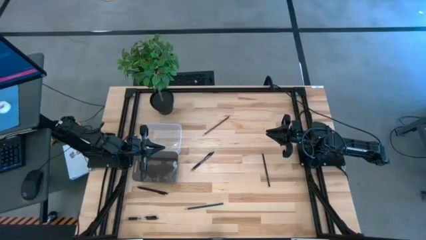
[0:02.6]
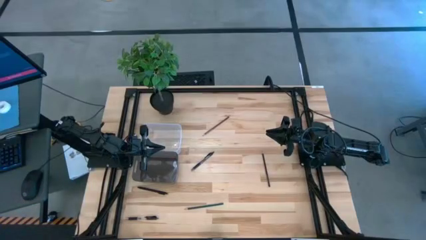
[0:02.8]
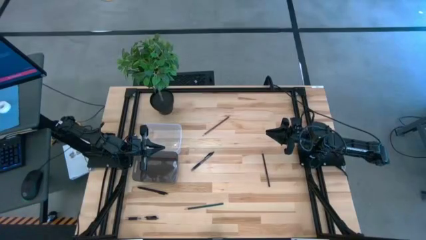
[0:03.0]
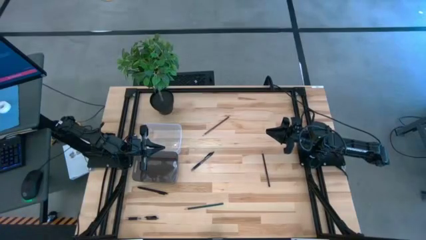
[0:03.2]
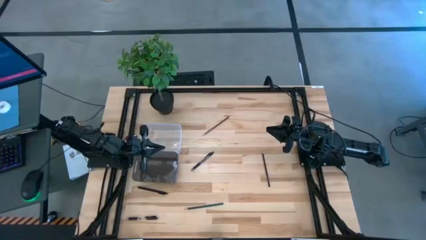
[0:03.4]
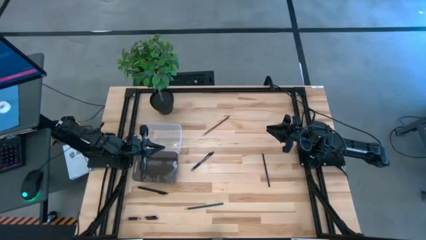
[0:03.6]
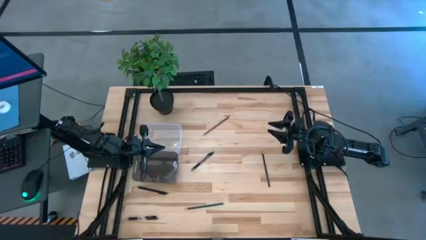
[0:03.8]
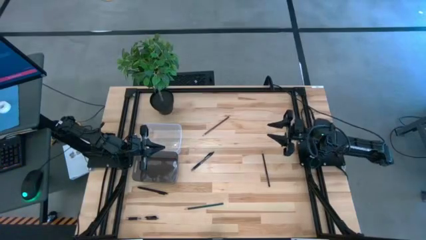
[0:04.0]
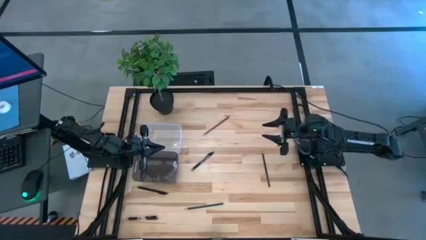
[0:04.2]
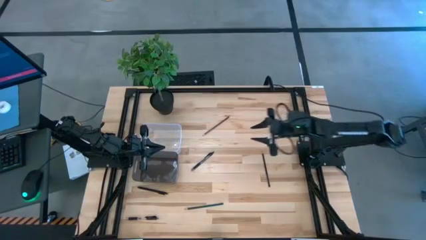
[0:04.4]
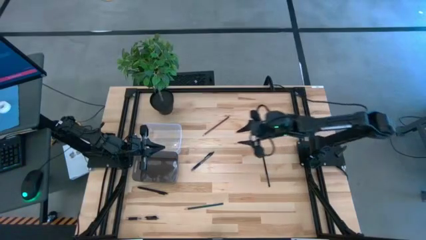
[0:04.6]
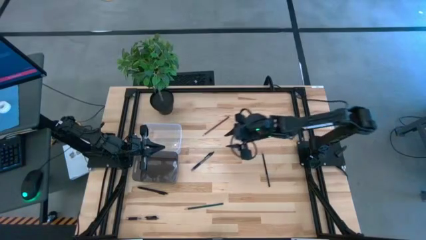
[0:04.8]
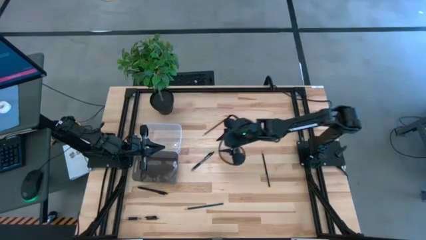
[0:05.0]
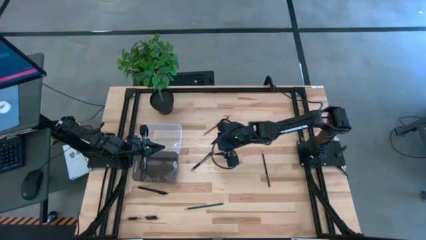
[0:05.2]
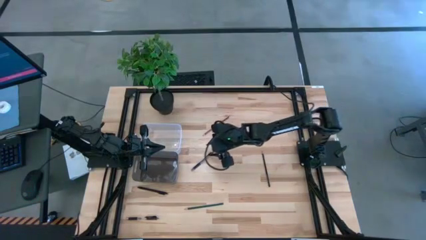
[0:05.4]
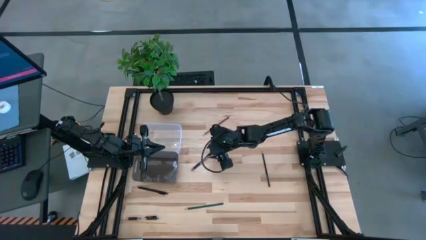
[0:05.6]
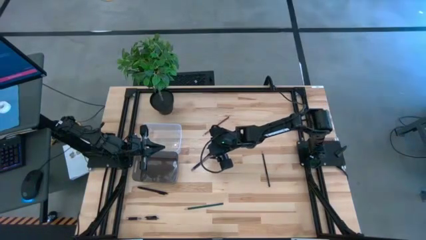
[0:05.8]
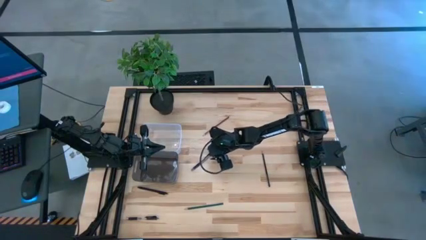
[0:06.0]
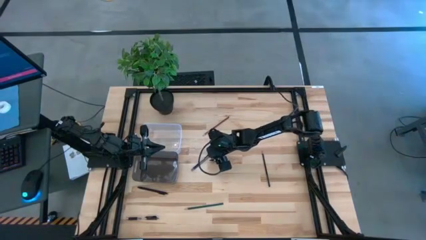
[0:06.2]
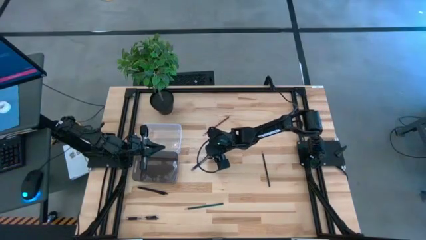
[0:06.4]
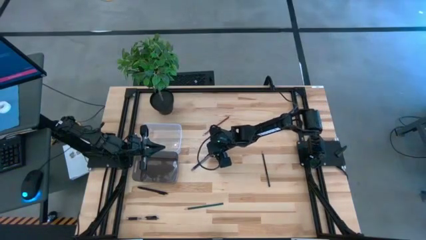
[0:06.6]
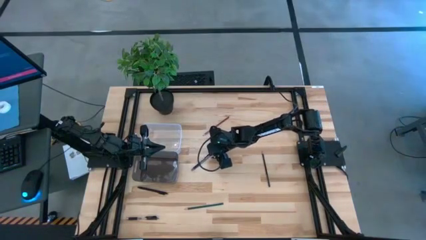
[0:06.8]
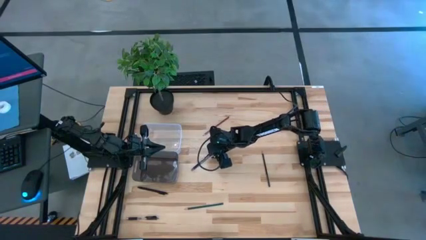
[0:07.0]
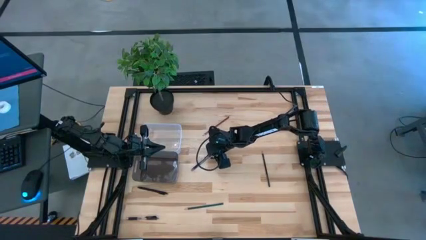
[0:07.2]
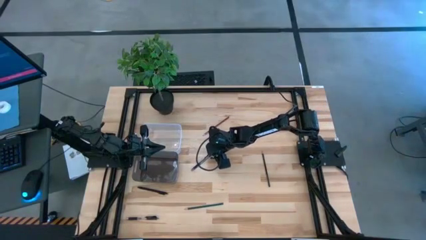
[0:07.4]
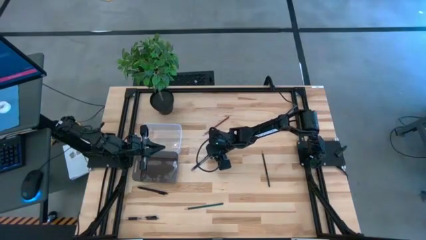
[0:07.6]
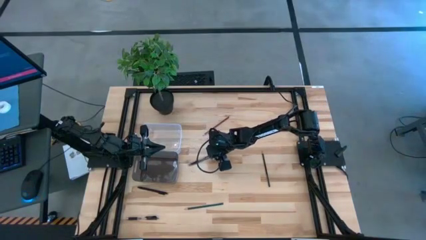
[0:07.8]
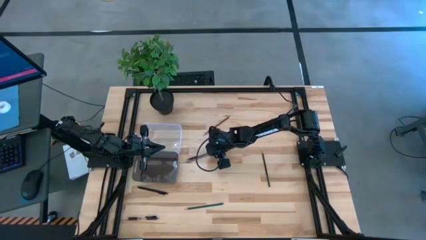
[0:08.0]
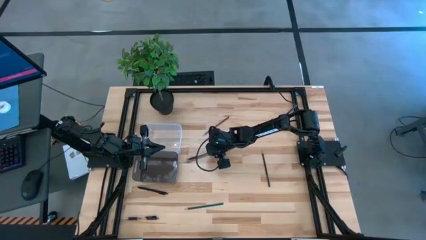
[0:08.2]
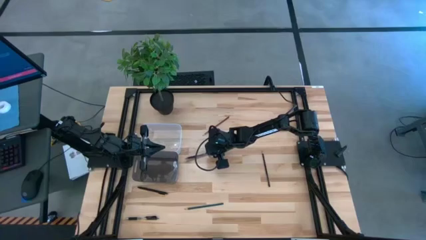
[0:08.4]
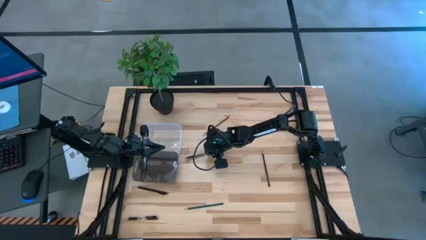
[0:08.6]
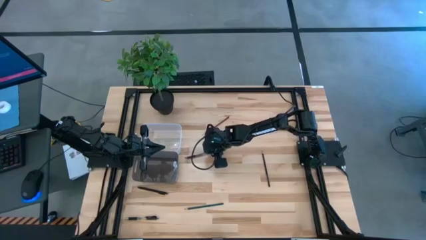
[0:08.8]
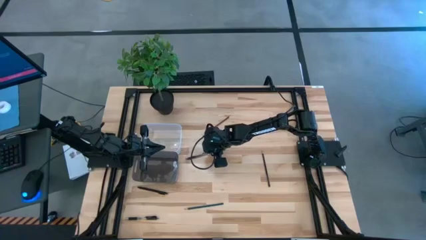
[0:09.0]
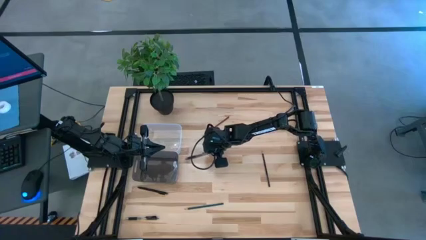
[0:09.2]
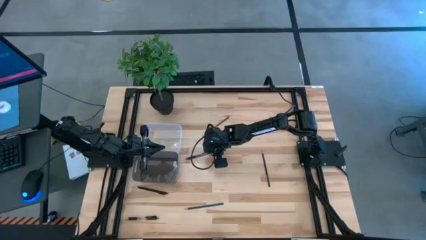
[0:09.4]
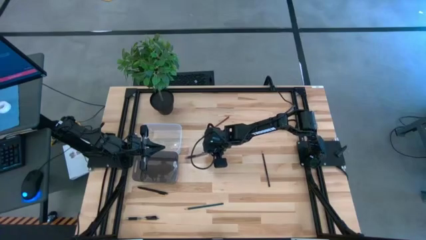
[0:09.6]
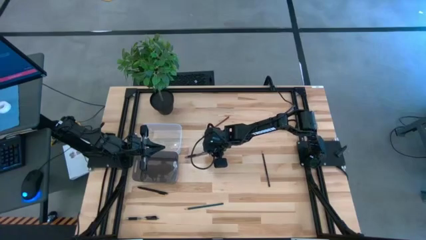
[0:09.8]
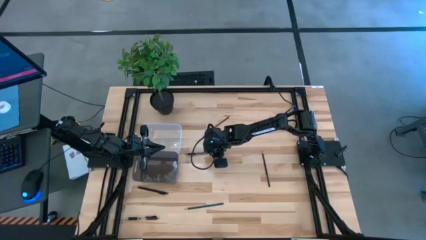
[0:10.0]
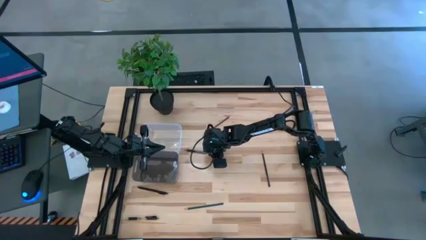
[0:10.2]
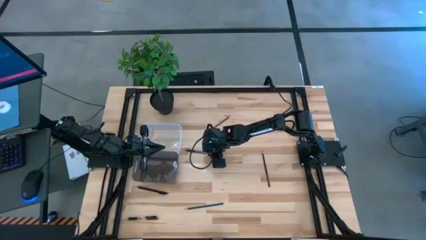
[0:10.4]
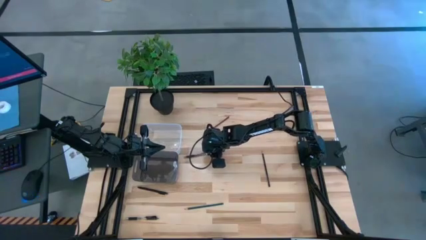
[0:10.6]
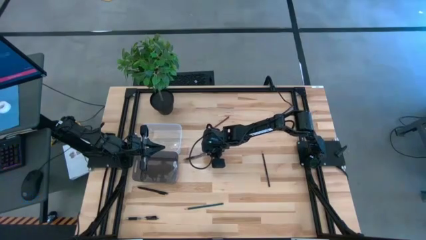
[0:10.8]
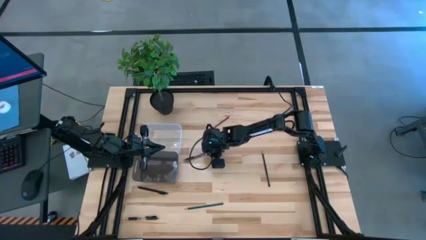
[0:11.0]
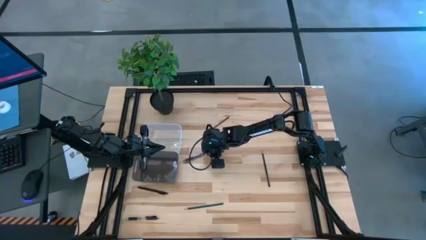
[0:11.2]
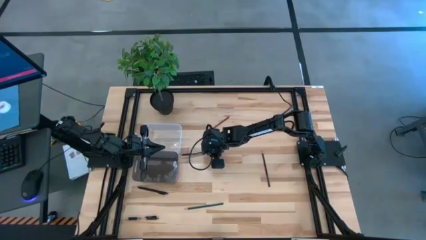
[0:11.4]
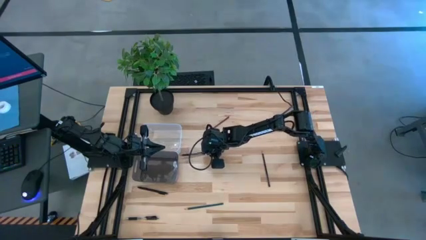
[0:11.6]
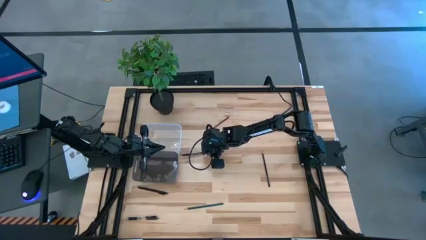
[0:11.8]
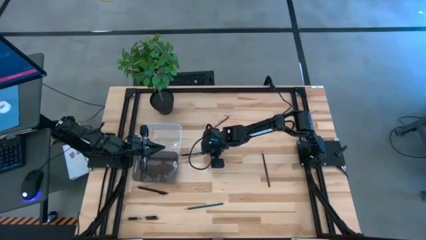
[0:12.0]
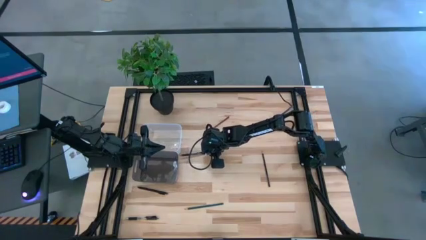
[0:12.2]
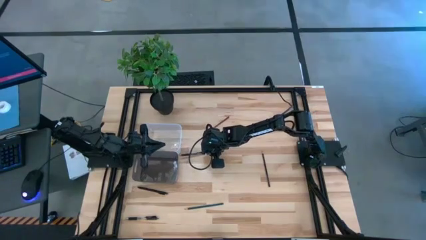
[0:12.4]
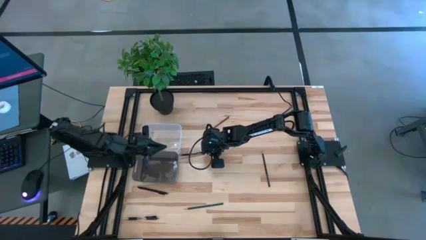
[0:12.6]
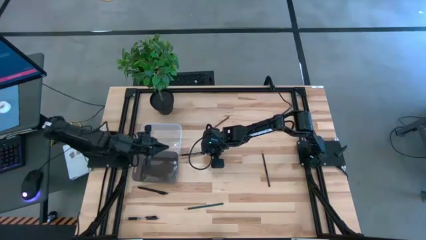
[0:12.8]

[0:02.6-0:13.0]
Task: Sort pens & pencils
Put the top center black pen into the black bin

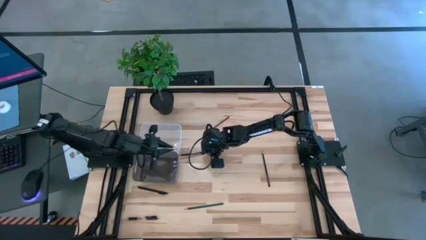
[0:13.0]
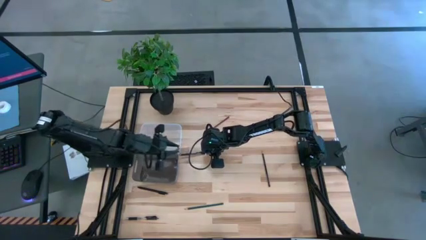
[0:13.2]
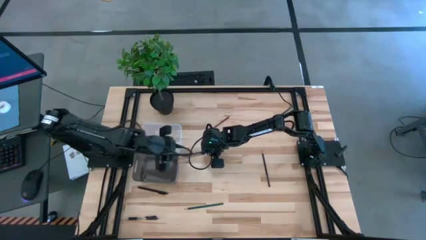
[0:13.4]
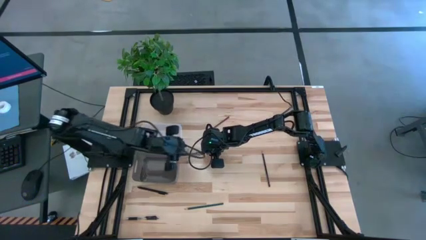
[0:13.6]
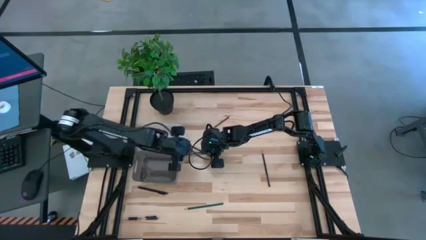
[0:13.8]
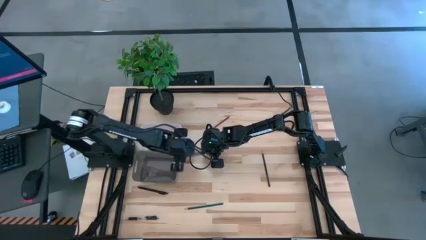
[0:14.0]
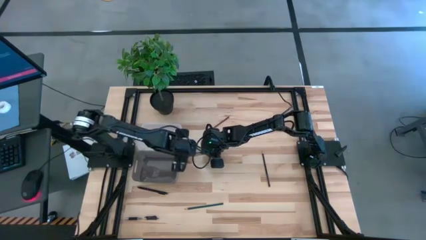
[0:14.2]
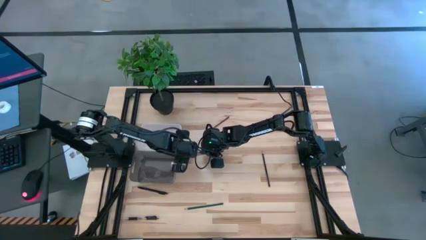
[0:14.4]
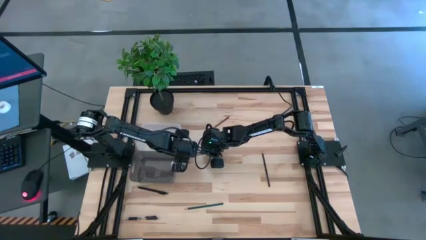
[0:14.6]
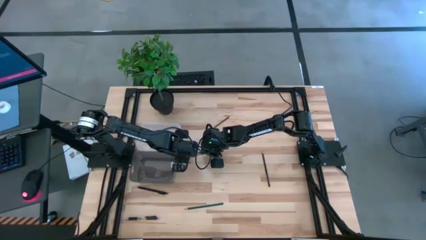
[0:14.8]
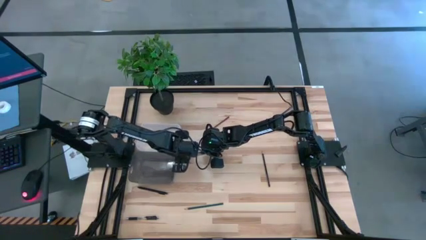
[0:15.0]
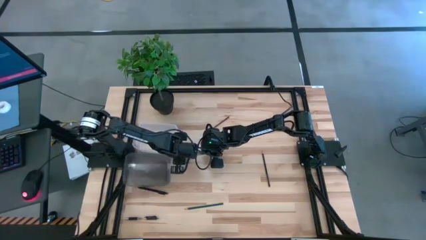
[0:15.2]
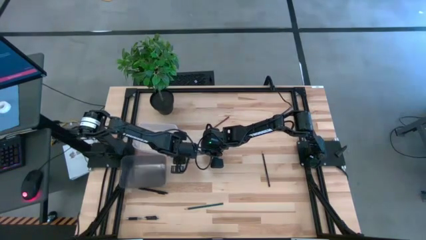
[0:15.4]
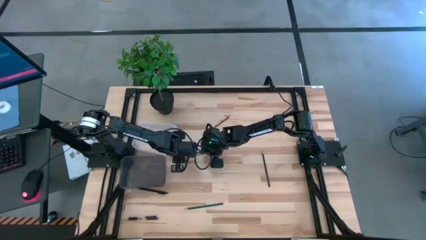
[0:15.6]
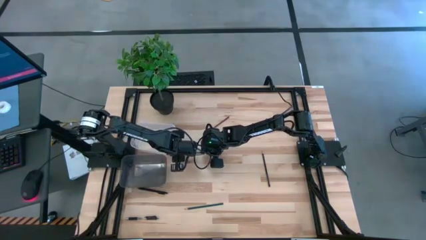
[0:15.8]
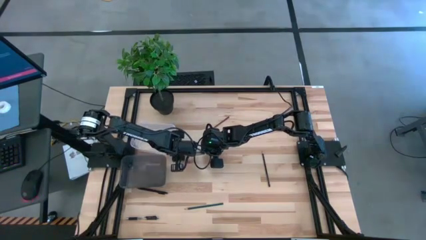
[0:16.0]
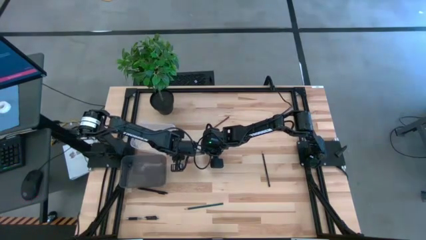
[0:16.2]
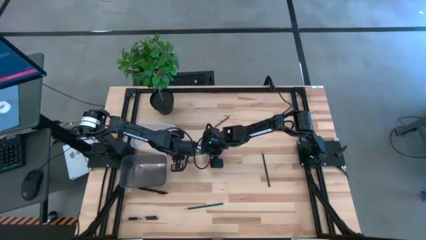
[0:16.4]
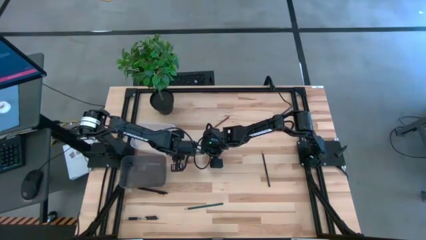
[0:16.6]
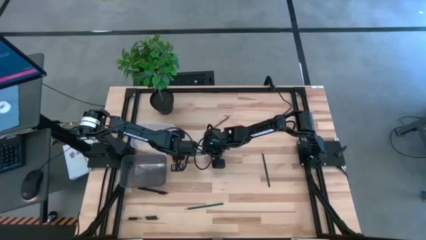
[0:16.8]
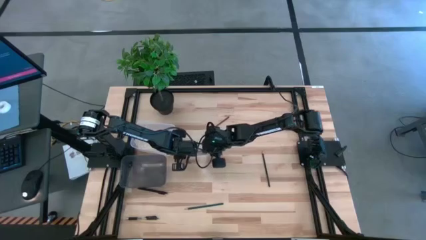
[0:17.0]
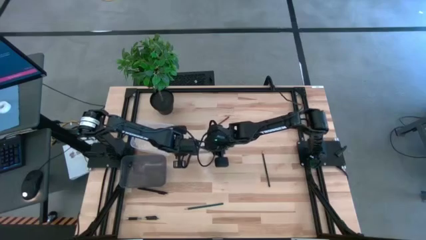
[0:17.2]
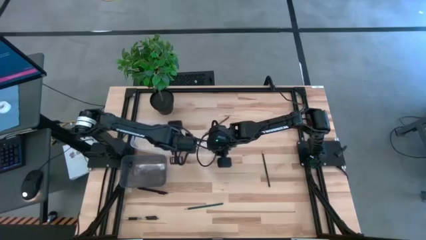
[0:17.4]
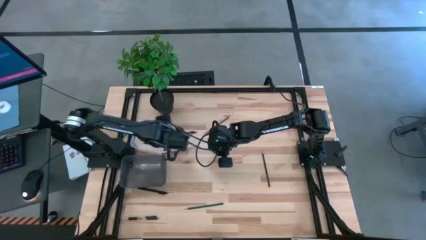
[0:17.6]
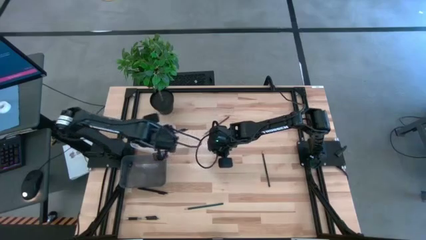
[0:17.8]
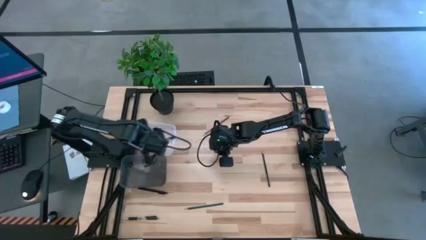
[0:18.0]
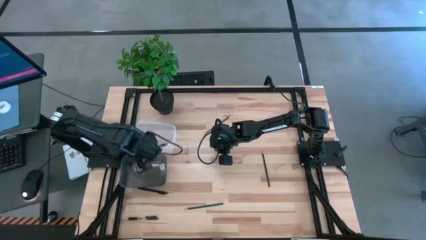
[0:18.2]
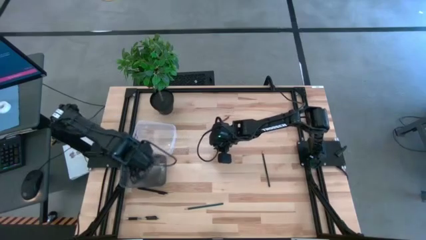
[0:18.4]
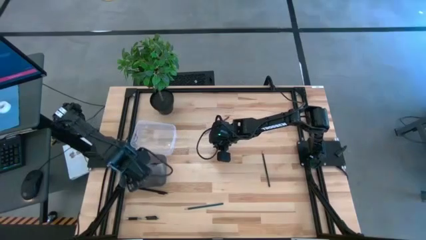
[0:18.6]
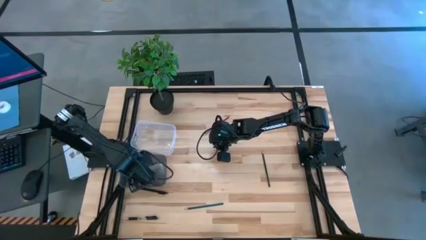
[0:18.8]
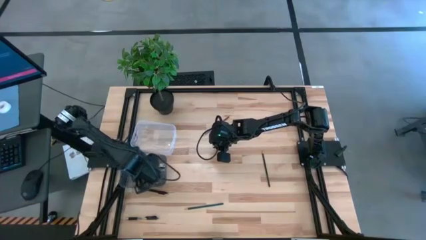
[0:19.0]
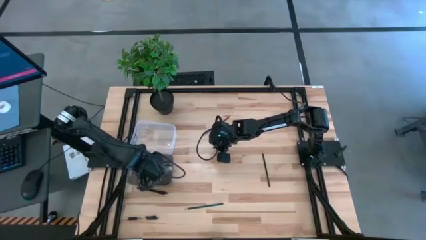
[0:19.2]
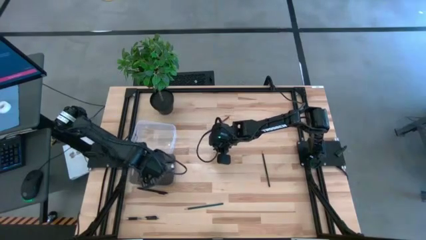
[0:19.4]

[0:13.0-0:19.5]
Put the top center black pen into the black bin
